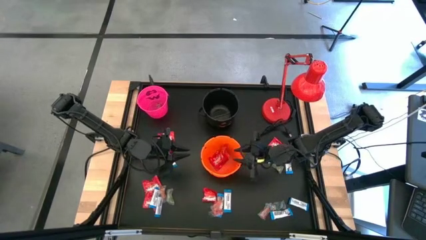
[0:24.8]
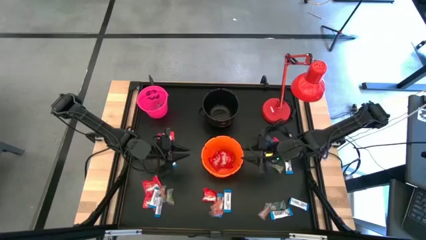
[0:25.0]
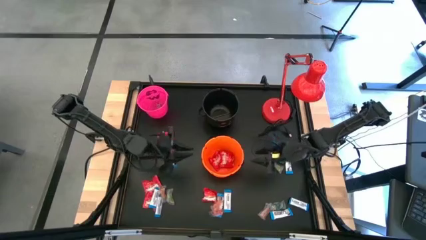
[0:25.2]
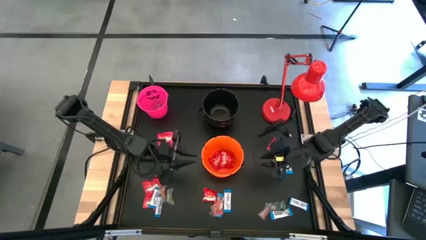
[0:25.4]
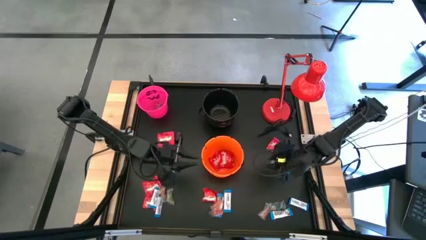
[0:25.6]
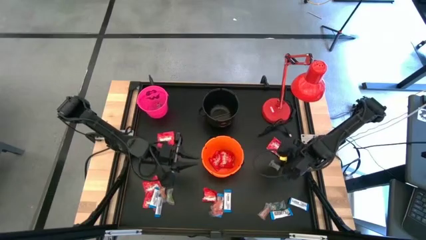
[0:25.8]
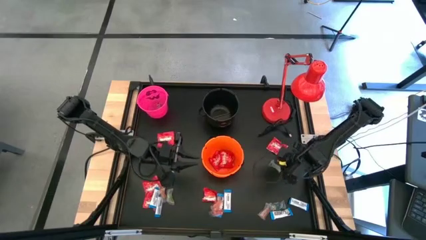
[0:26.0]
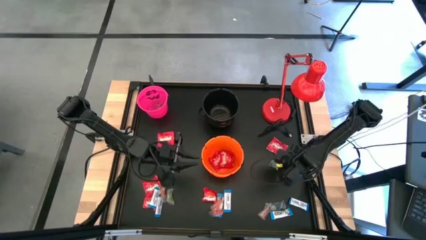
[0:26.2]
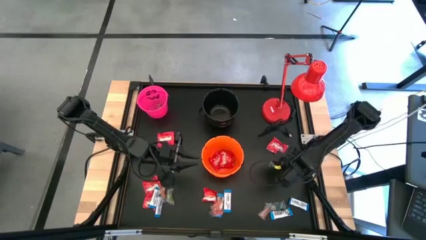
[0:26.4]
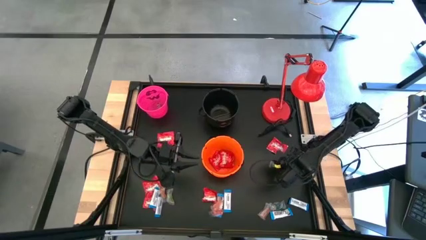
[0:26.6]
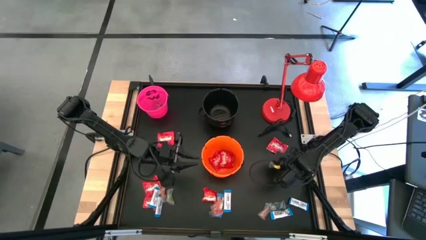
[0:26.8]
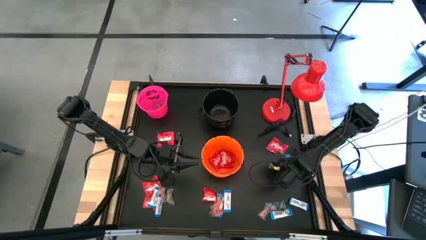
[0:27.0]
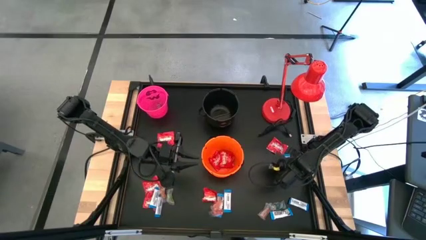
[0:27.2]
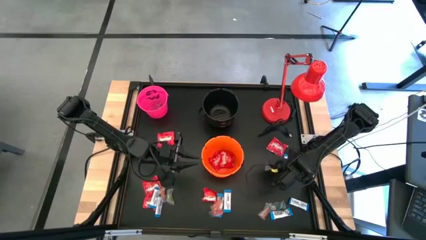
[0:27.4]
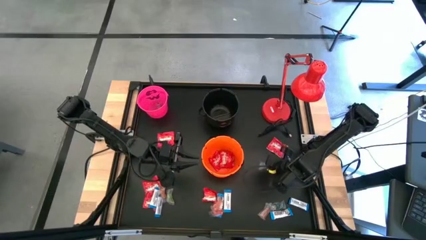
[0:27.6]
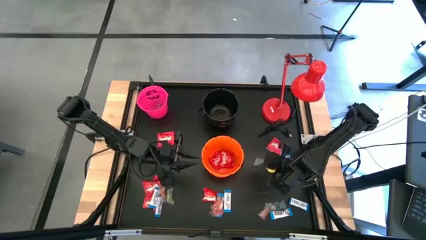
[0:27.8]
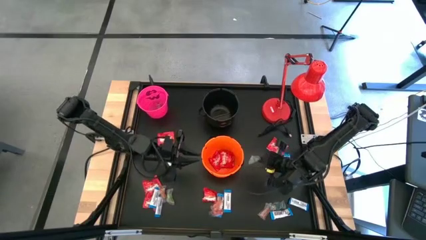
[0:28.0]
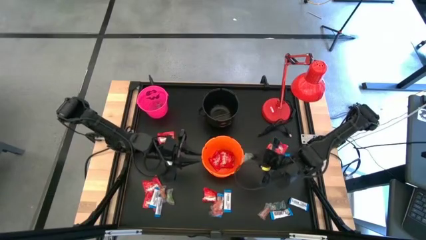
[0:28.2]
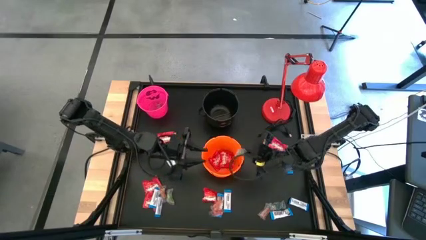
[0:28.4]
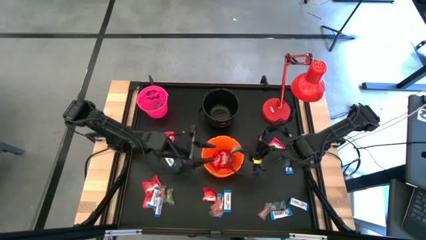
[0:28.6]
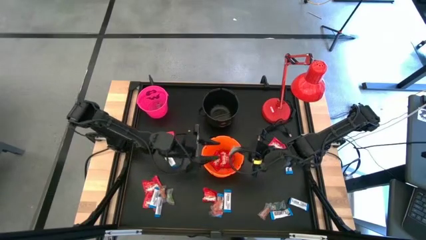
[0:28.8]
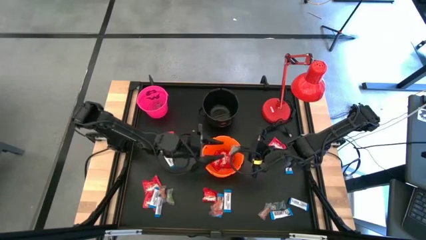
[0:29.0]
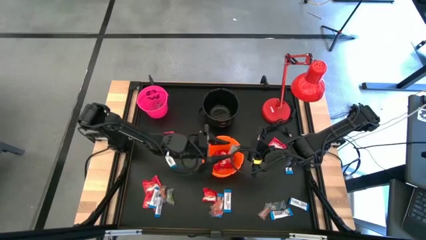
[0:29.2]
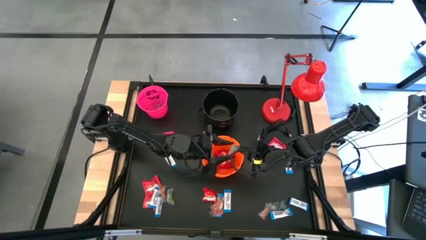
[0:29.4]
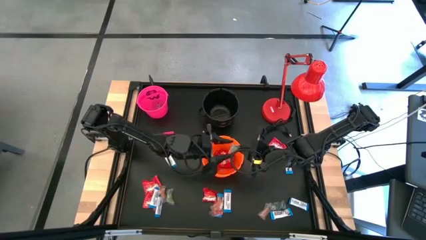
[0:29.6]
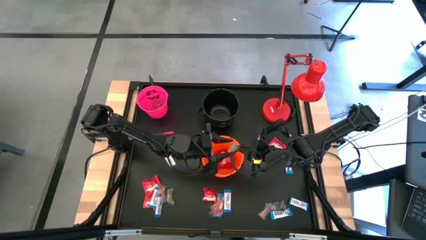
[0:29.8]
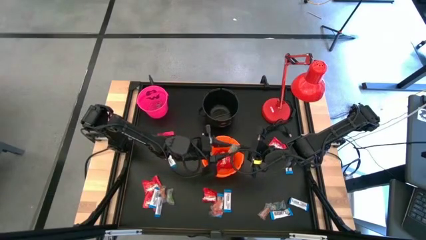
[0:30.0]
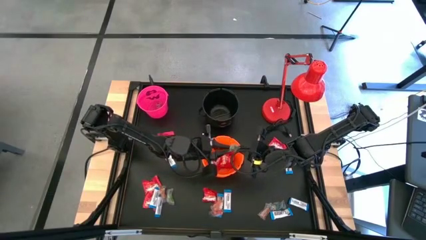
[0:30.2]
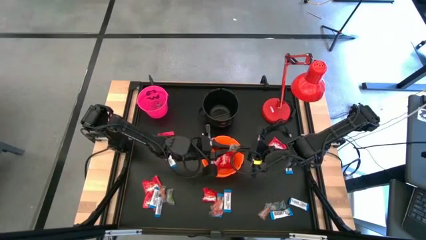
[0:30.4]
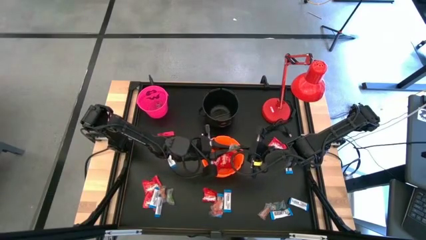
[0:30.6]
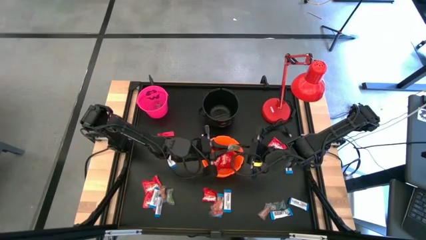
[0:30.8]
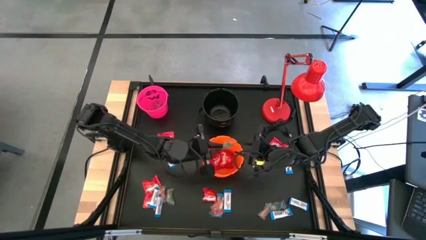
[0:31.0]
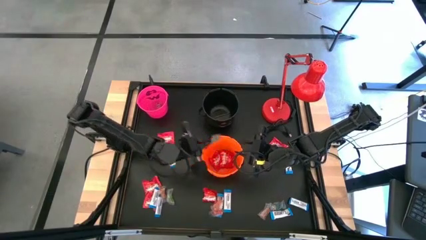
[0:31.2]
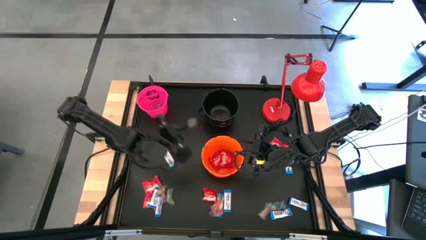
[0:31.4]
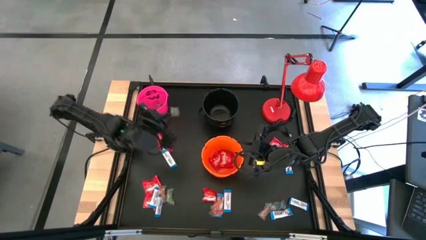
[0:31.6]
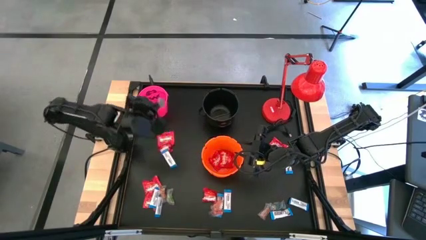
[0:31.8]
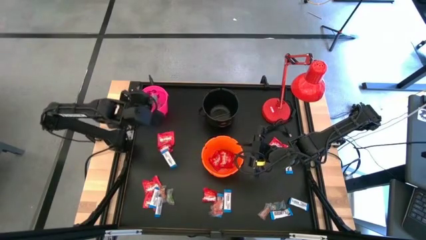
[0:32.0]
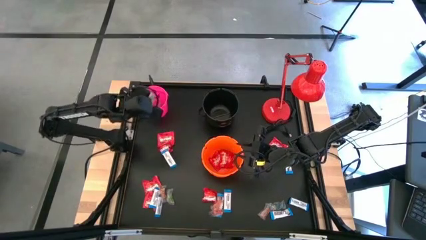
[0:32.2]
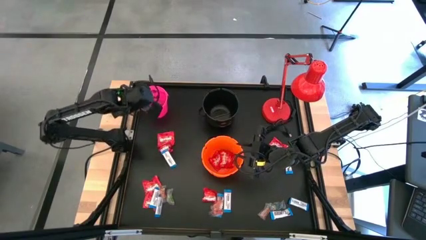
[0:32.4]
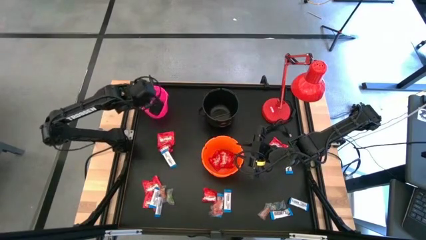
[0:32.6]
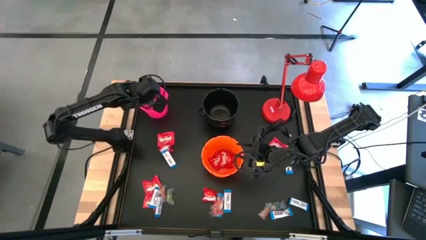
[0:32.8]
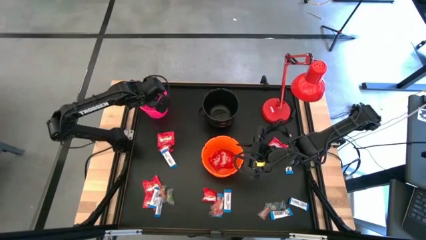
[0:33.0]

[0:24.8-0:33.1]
Task: Sort candy
Put the green gummy into the pink bucket

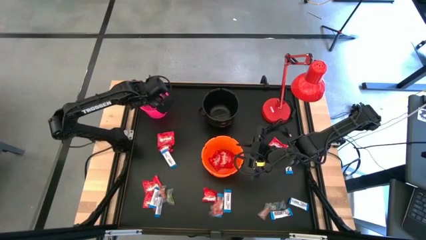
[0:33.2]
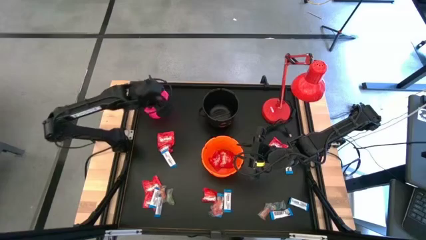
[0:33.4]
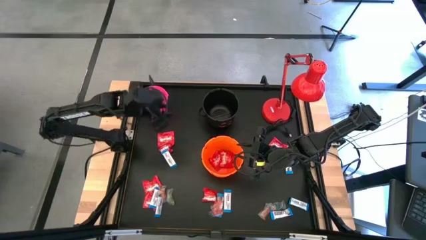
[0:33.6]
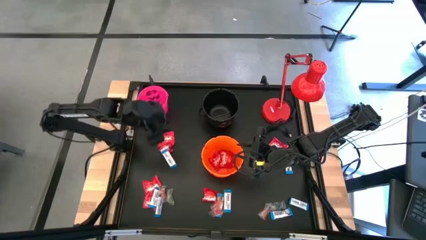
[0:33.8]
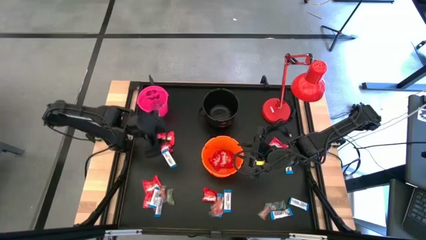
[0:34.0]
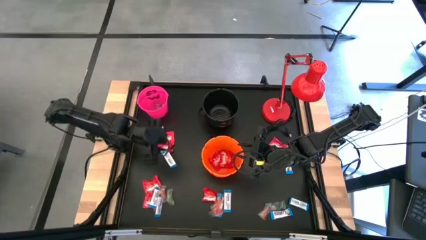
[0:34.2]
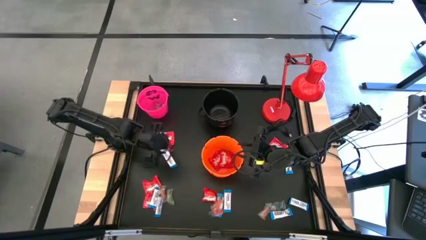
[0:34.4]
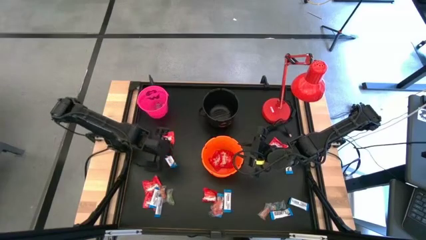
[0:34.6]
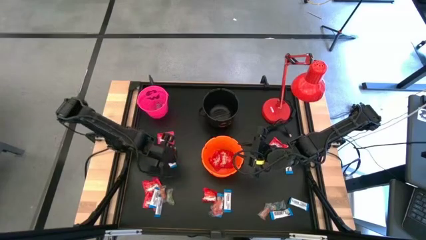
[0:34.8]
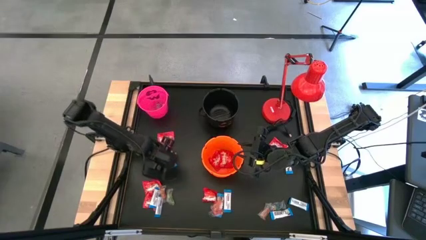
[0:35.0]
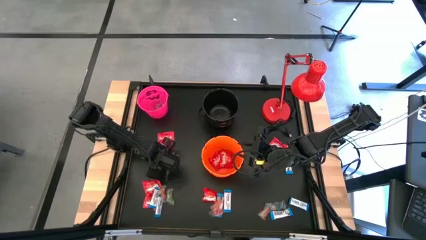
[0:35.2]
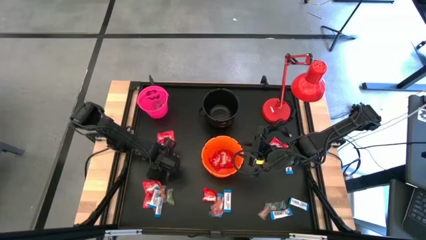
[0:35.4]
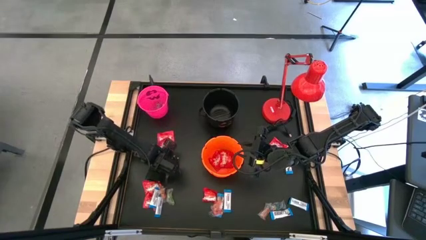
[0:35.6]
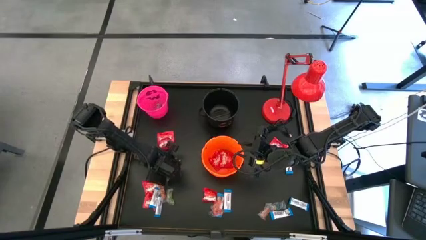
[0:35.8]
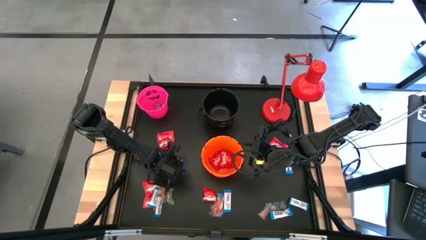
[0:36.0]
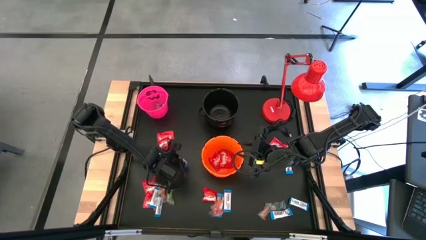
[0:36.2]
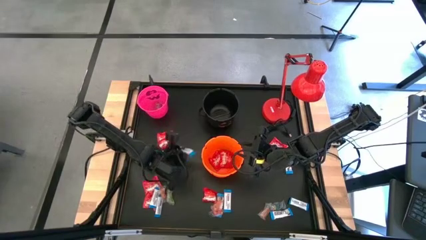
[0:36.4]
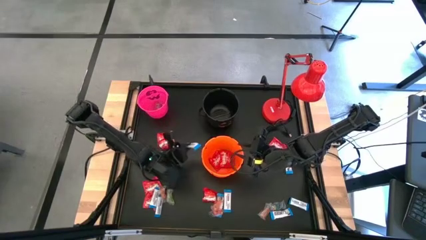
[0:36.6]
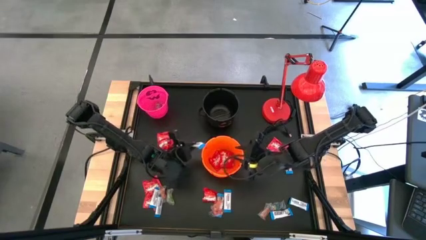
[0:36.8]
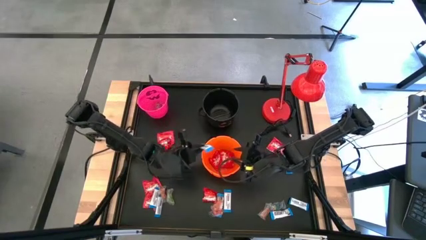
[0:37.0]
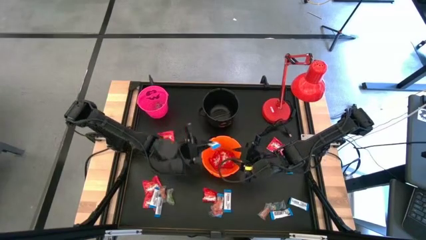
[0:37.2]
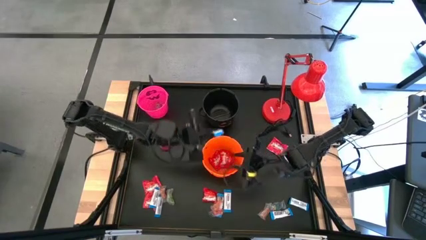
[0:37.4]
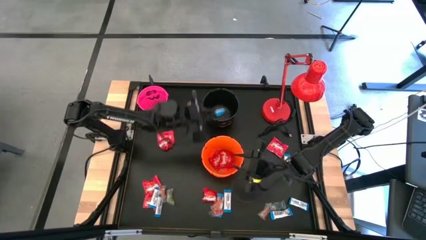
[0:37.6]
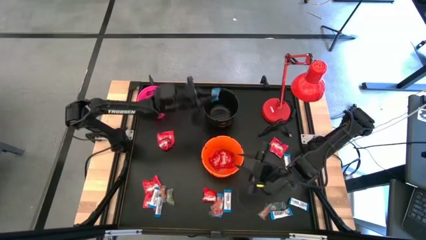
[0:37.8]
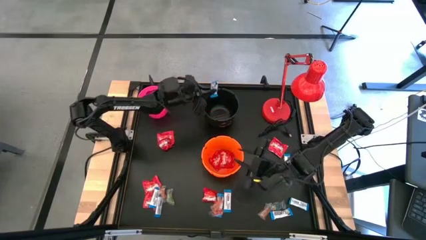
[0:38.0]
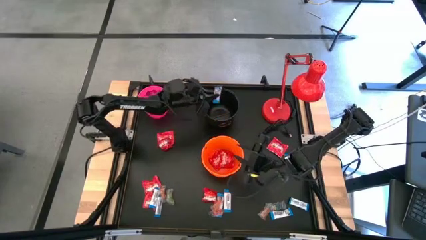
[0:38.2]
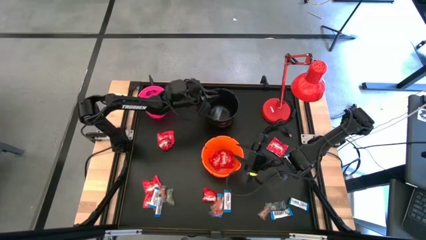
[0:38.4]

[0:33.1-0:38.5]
Put the white chocolate into the black bucket

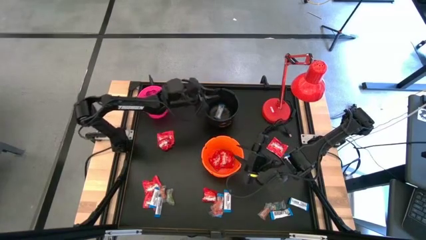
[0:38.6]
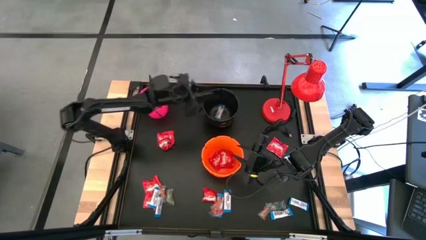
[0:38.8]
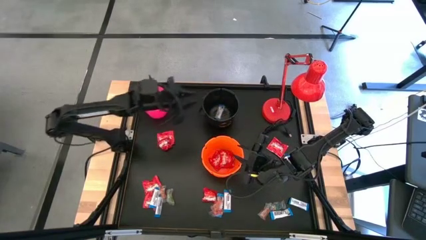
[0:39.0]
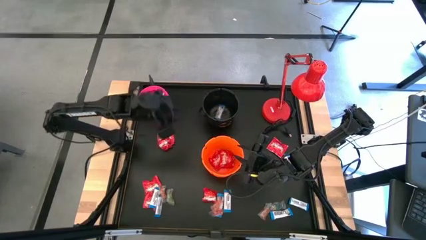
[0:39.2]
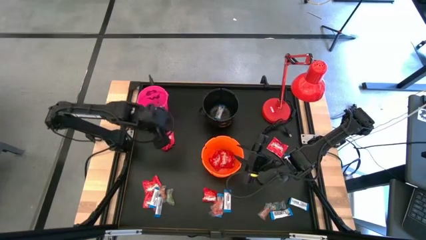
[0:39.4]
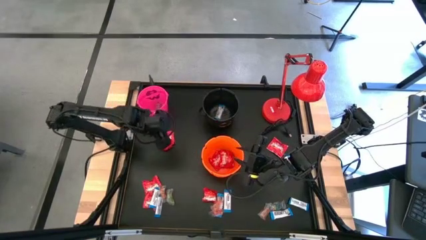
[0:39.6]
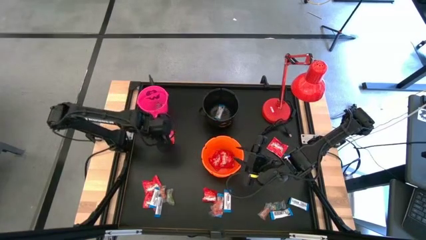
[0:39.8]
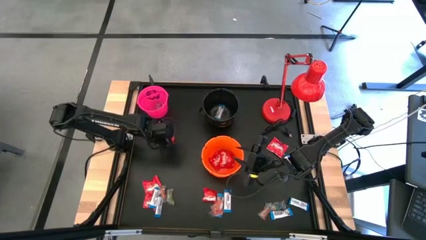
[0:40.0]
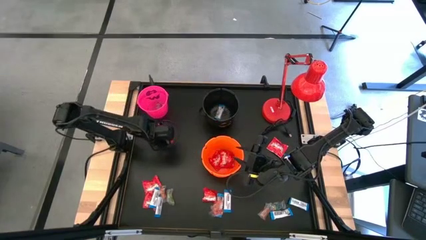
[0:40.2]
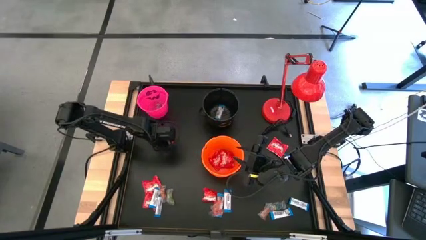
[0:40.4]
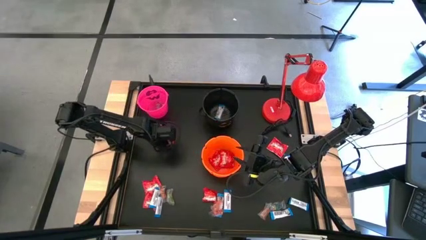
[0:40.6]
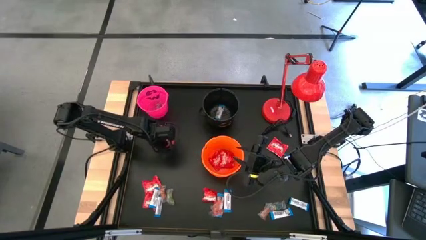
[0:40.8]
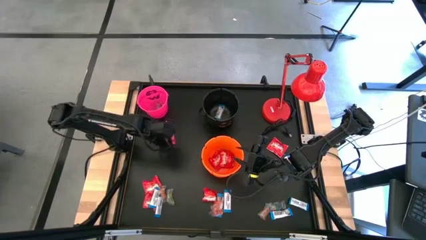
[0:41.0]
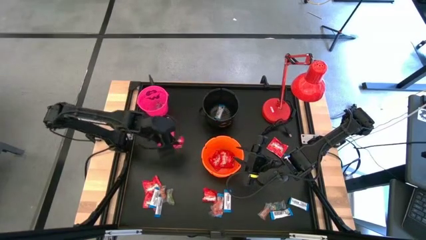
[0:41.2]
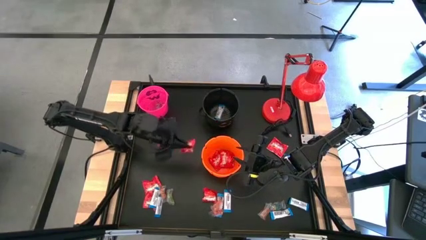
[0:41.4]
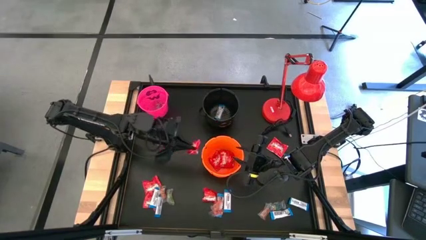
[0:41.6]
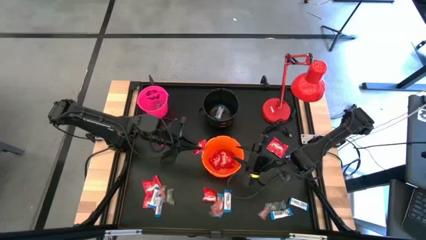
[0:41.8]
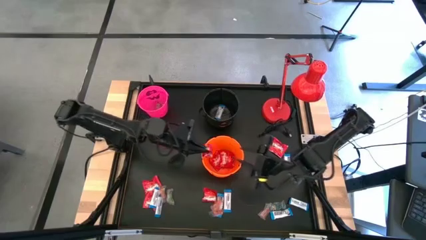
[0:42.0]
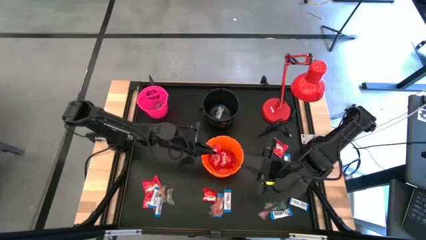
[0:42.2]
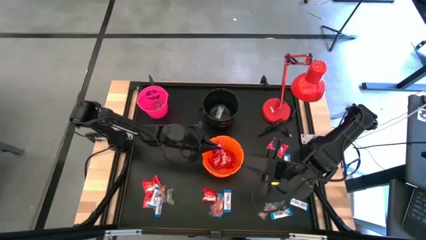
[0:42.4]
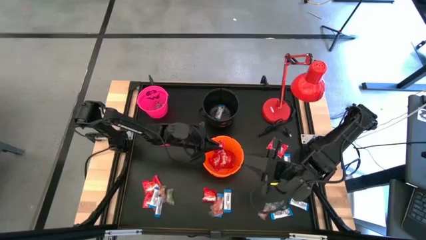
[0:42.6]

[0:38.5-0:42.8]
Put the red candy into the orange bucket
